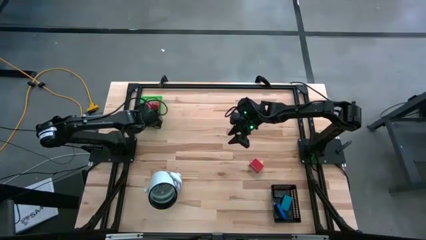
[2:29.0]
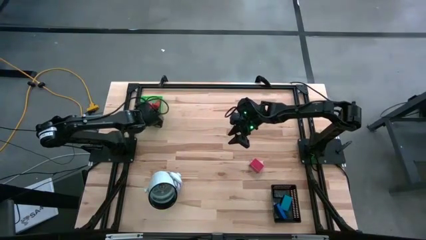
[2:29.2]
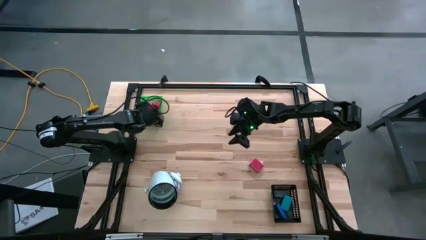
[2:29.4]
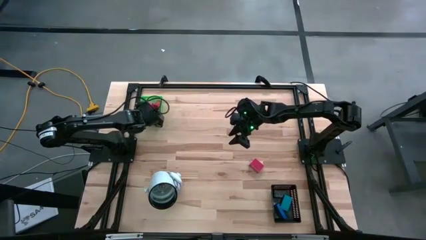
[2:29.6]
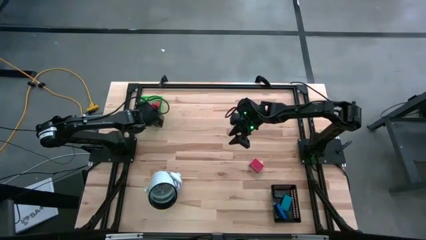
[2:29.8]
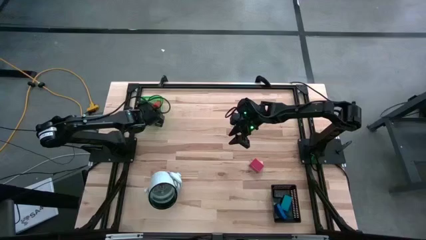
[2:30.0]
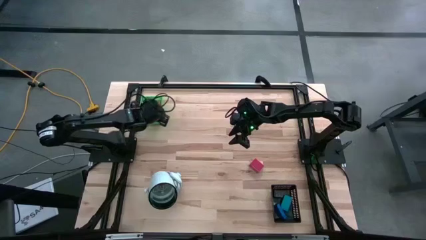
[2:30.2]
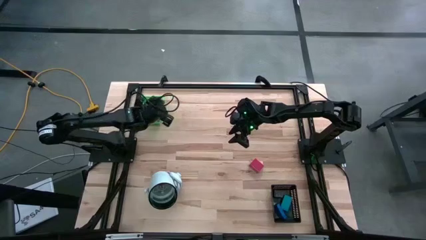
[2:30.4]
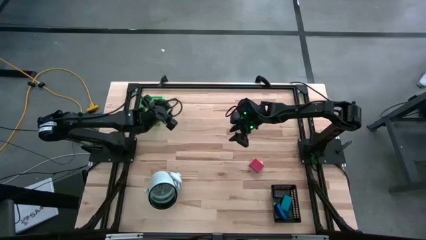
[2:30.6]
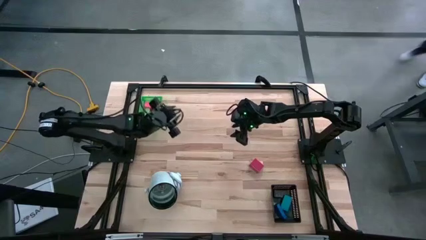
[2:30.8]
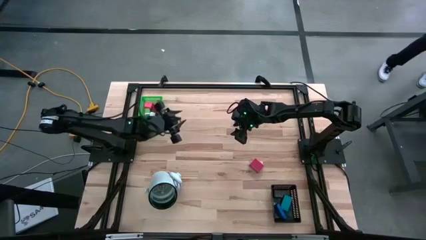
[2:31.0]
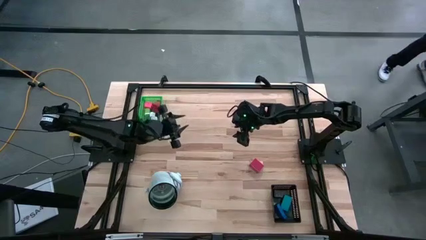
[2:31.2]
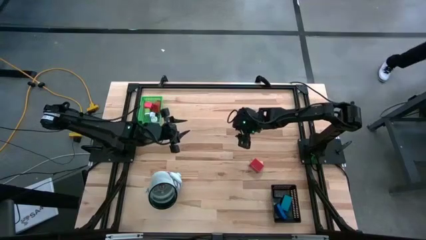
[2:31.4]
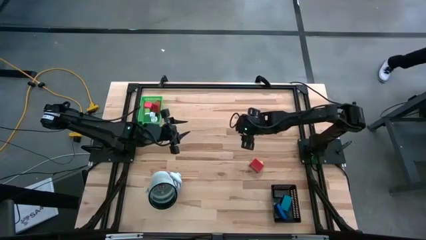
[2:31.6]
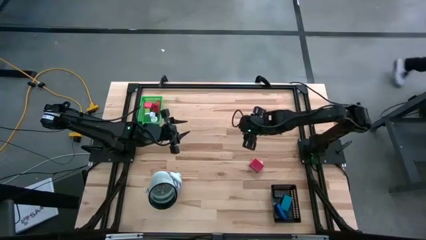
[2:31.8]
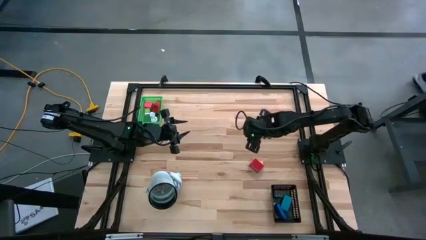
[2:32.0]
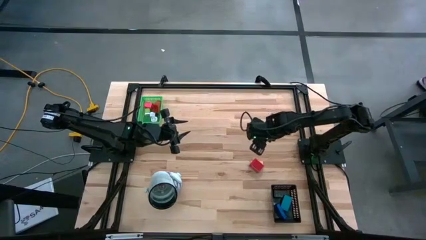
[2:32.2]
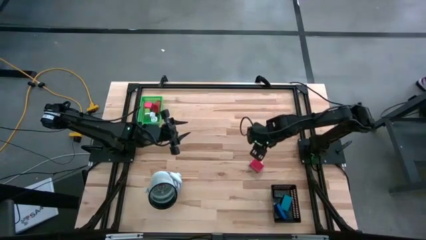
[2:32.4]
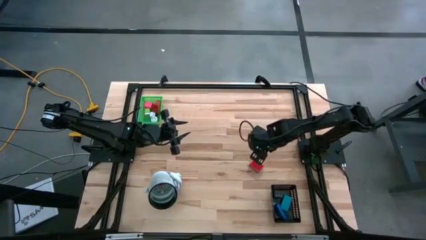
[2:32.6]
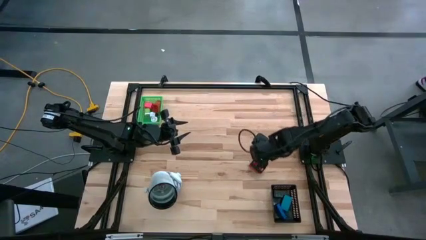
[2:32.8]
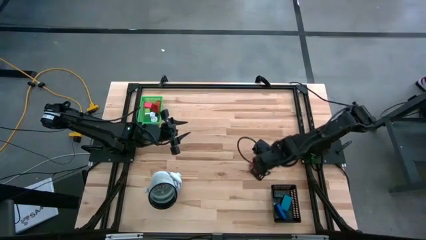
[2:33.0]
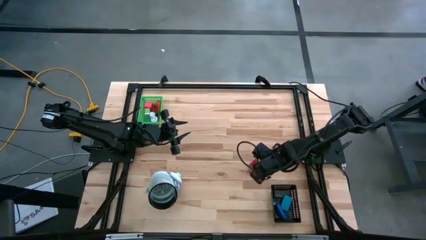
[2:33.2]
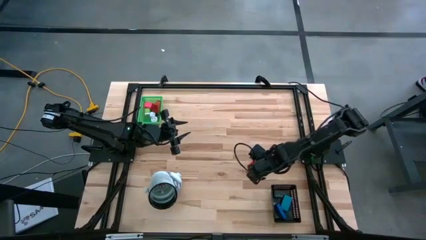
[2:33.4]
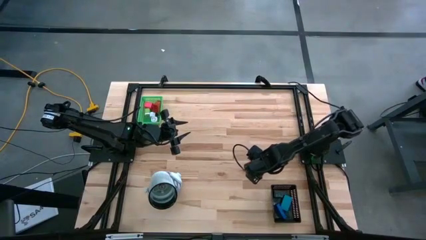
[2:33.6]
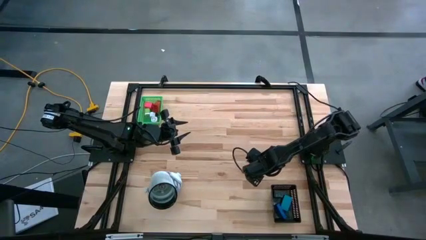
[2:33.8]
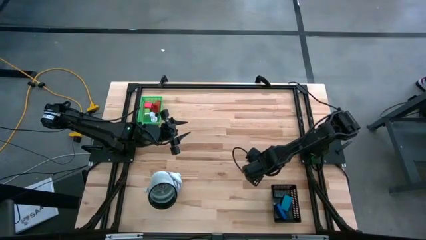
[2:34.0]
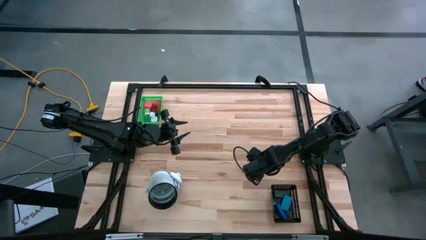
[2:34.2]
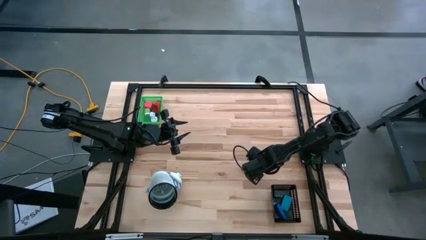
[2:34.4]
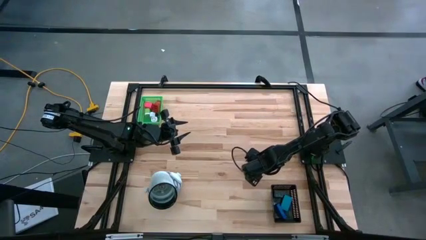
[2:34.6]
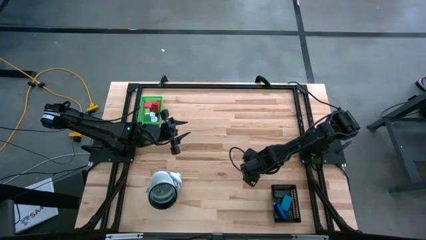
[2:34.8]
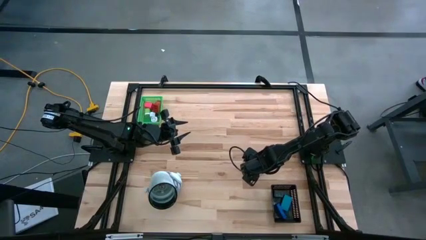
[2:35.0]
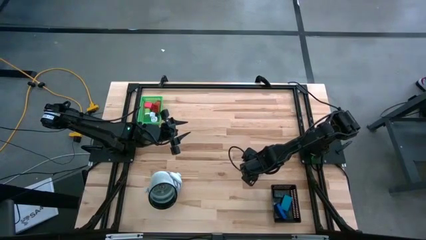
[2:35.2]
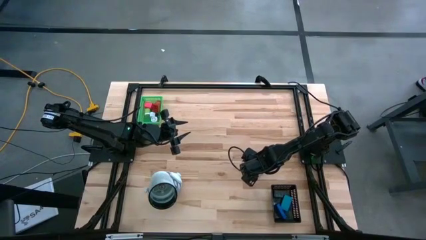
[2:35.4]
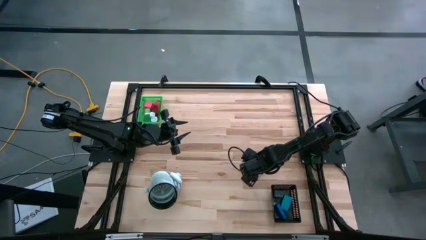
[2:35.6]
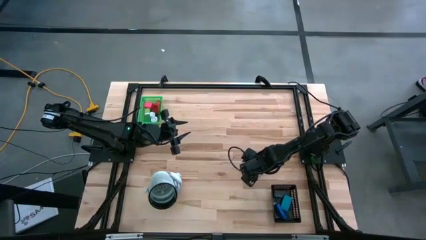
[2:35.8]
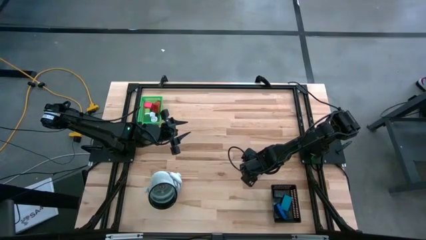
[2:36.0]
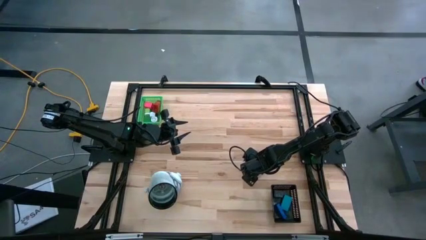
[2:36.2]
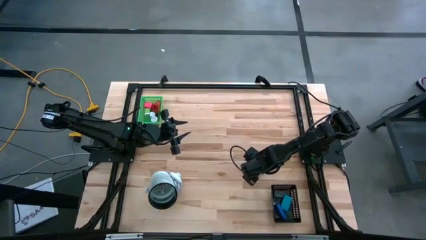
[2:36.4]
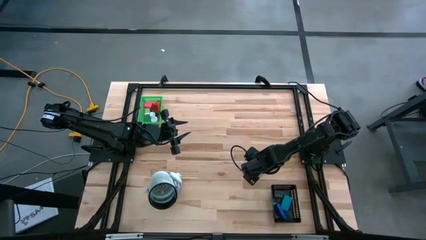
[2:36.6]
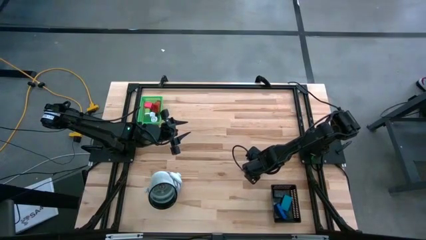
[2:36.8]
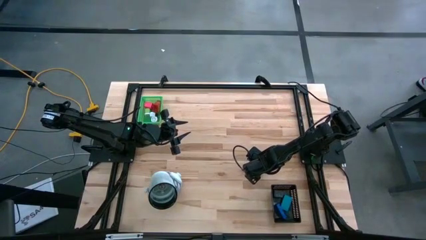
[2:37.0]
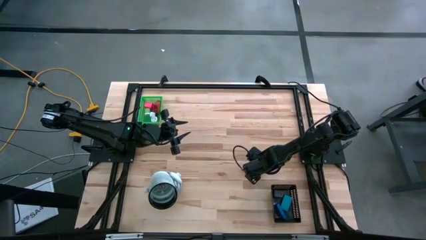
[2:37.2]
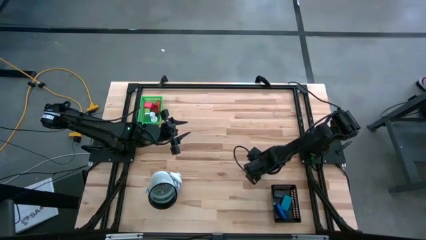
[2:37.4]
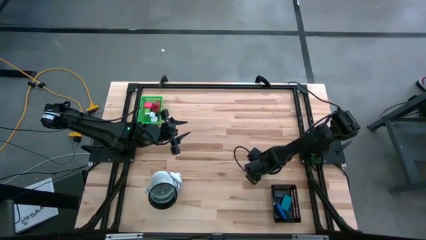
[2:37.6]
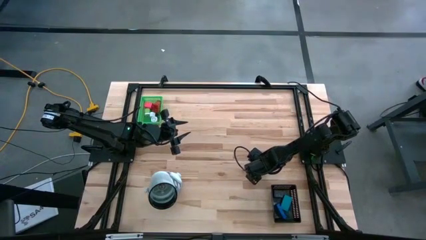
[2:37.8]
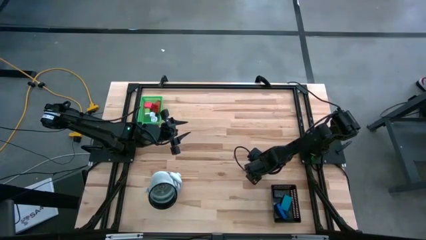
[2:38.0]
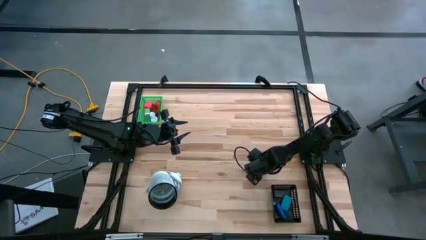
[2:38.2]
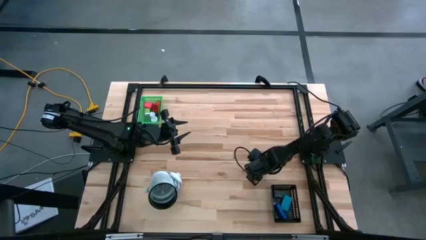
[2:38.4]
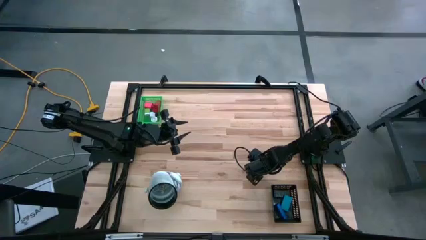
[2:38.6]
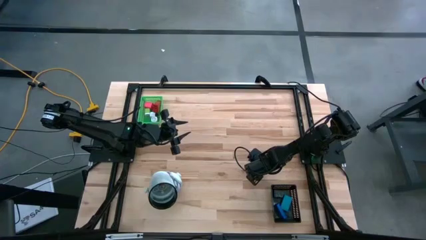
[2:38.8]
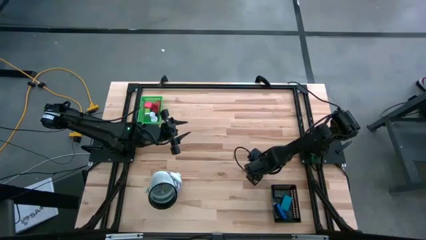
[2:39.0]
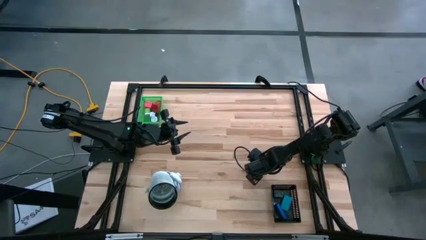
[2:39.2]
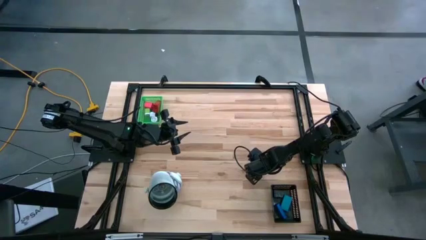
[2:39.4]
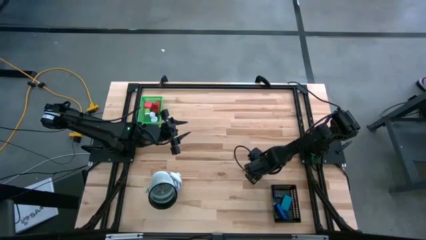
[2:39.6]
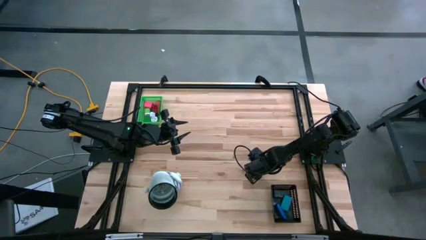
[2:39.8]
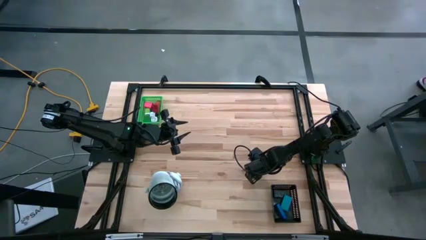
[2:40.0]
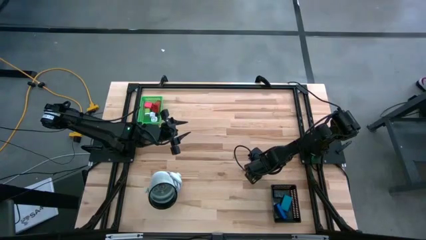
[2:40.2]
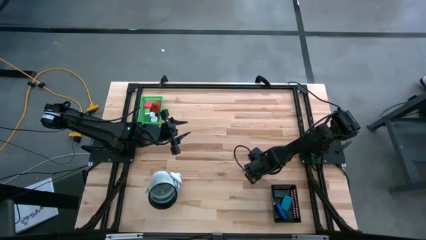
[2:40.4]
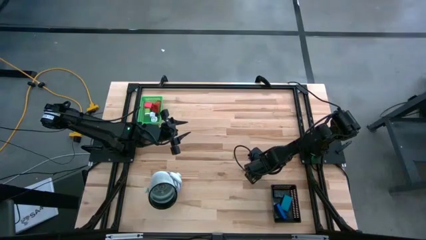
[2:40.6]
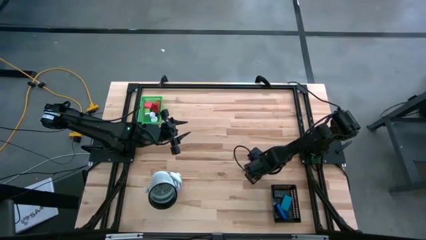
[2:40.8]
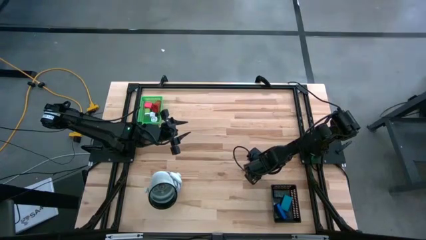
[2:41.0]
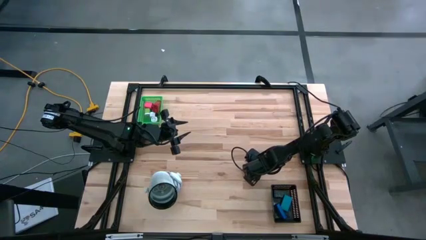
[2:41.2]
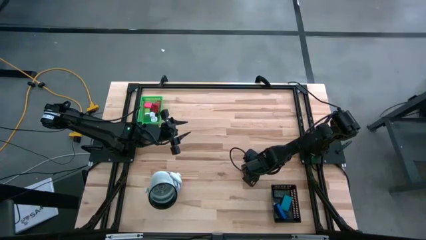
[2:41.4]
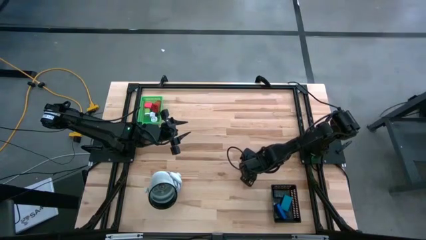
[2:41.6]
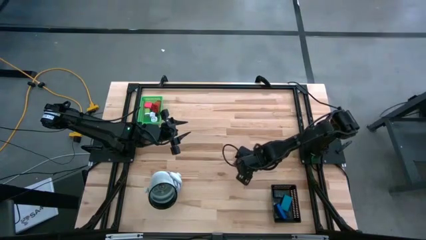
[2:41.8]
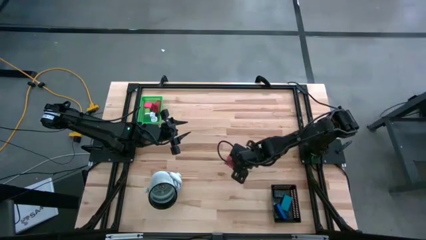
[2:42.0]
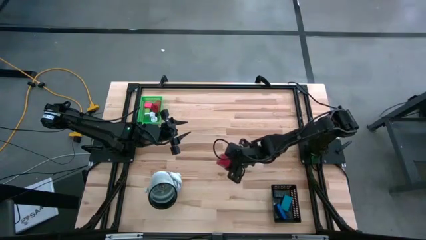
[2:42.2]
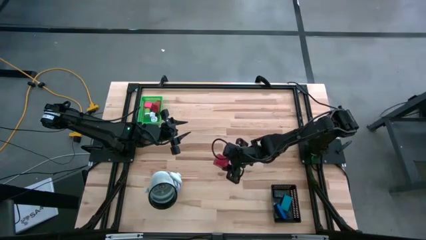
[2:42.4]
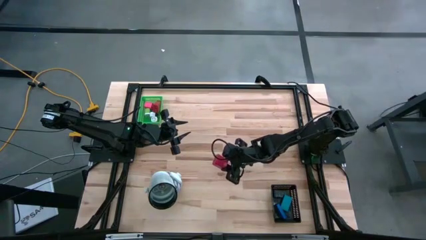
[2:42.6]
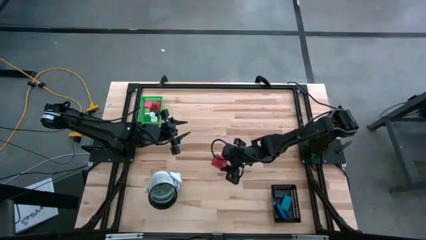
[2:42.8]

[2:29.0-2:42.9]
Task: Pick & Place Office items
Put the red charger adapter into the bin
